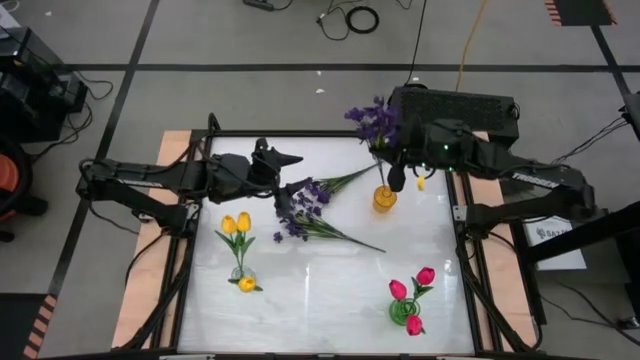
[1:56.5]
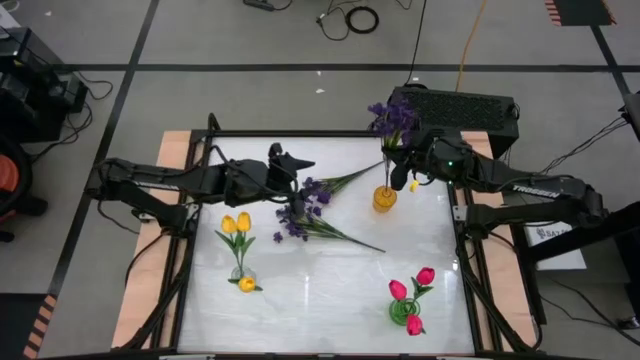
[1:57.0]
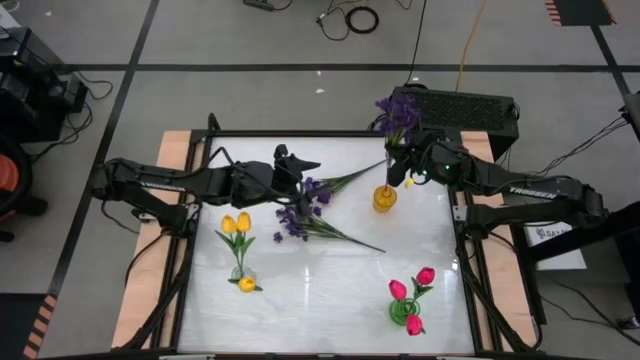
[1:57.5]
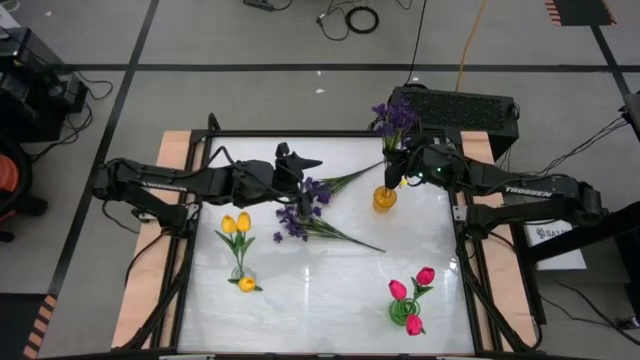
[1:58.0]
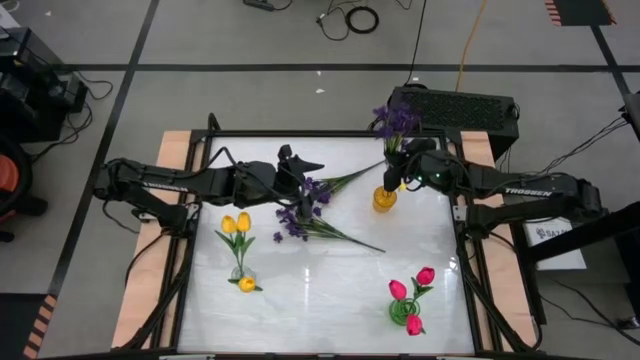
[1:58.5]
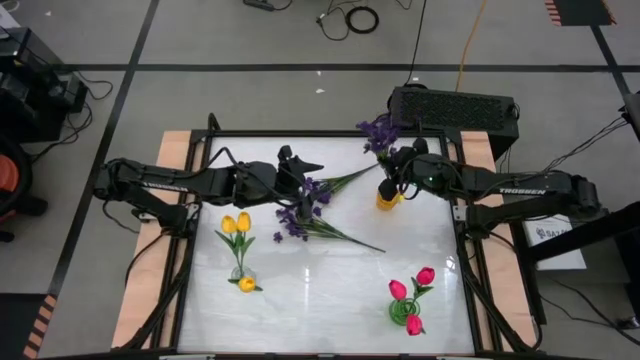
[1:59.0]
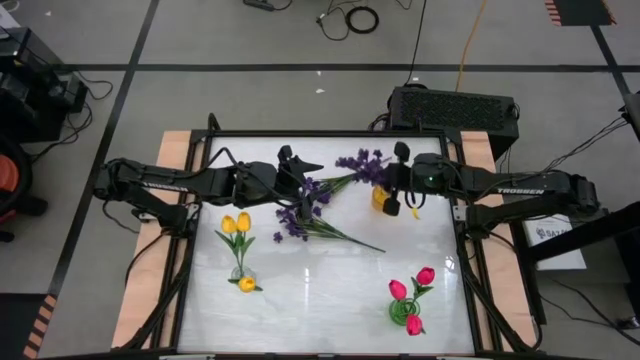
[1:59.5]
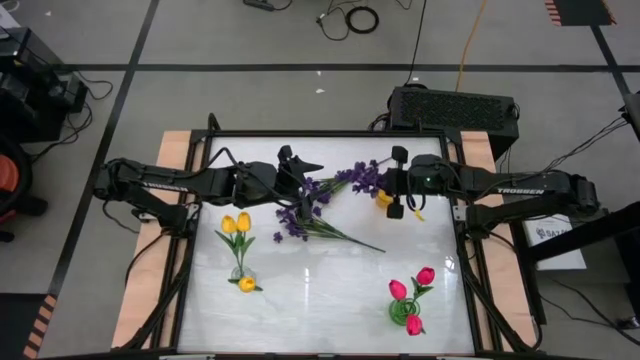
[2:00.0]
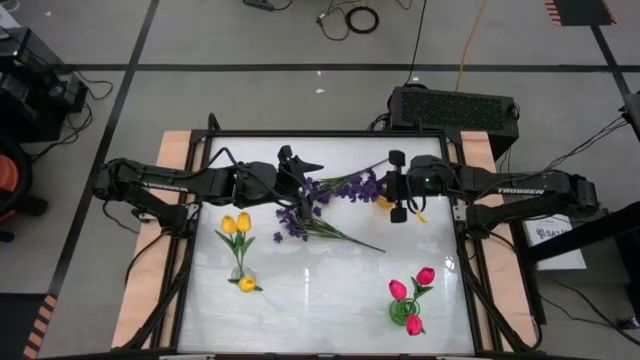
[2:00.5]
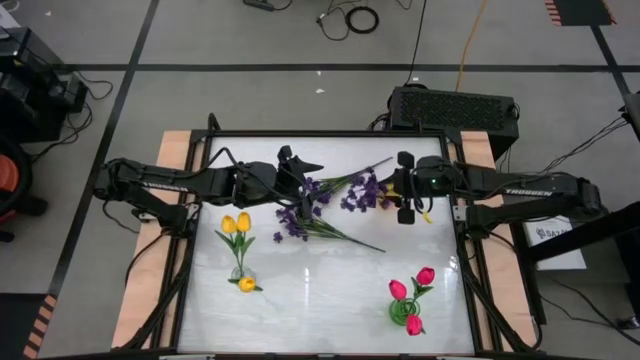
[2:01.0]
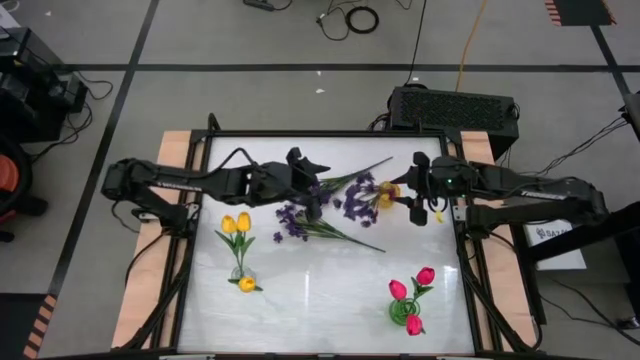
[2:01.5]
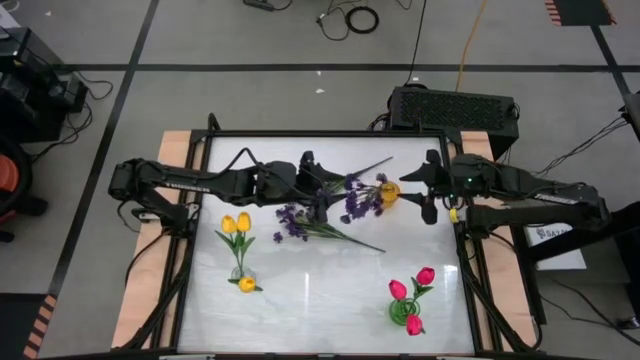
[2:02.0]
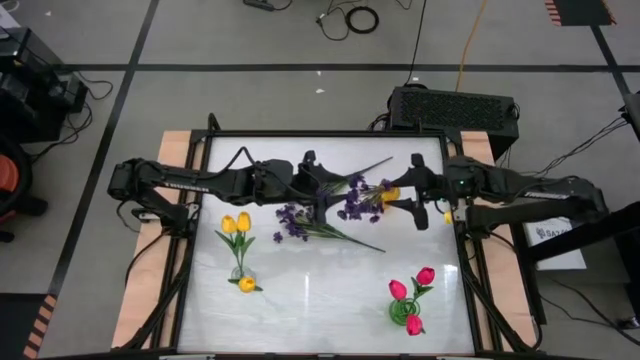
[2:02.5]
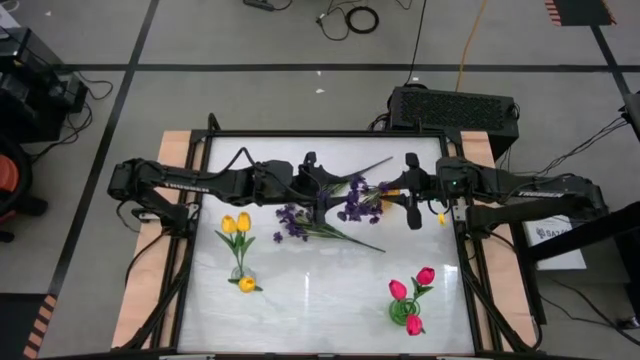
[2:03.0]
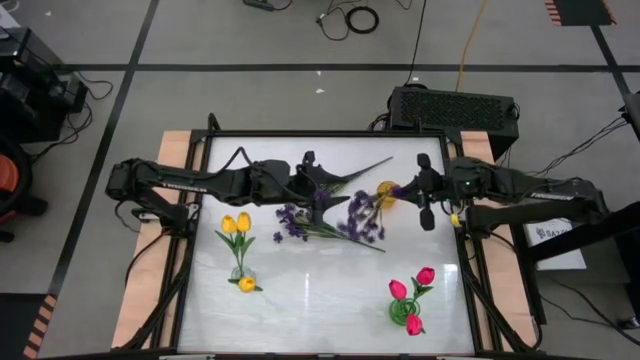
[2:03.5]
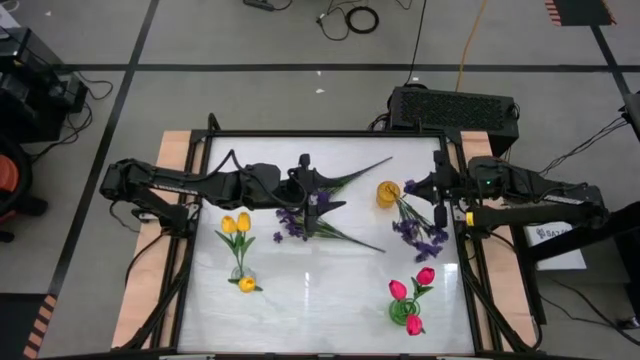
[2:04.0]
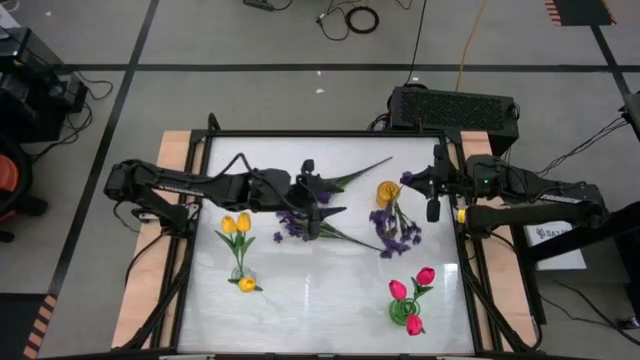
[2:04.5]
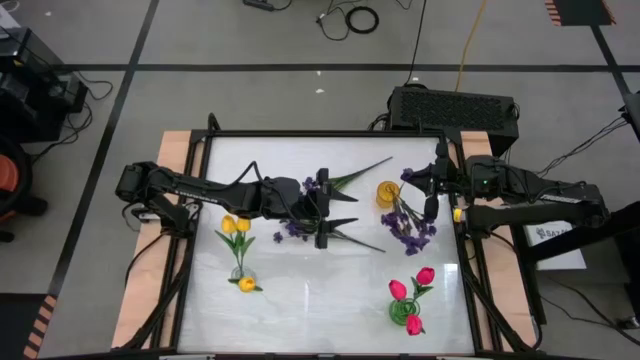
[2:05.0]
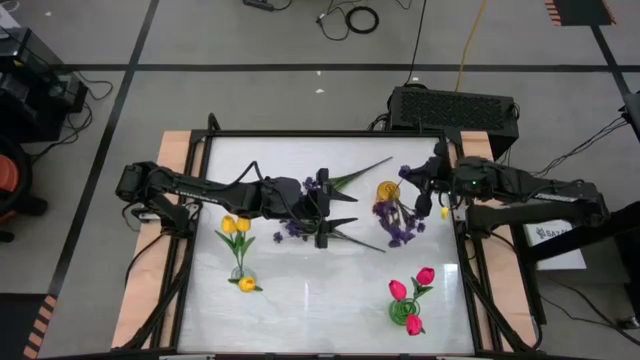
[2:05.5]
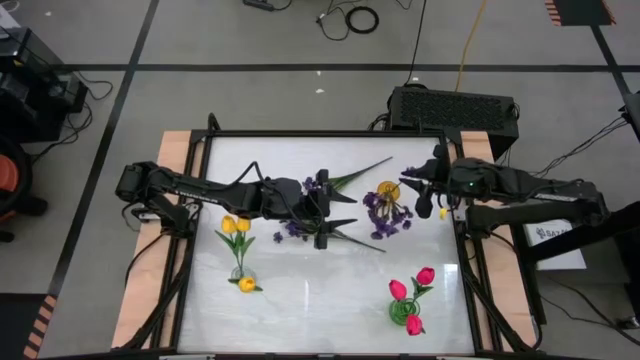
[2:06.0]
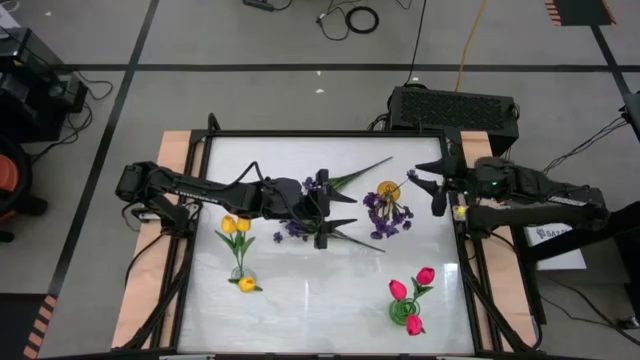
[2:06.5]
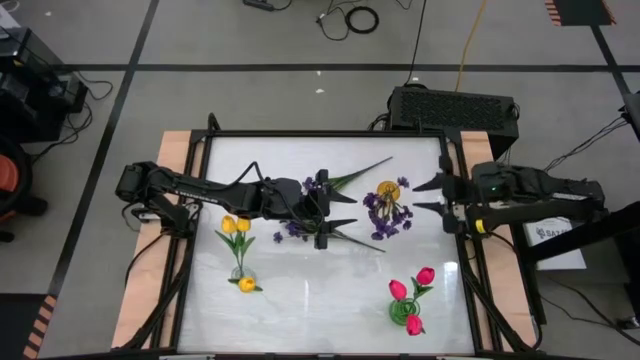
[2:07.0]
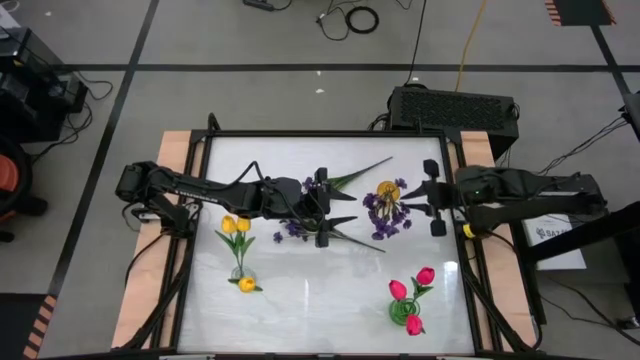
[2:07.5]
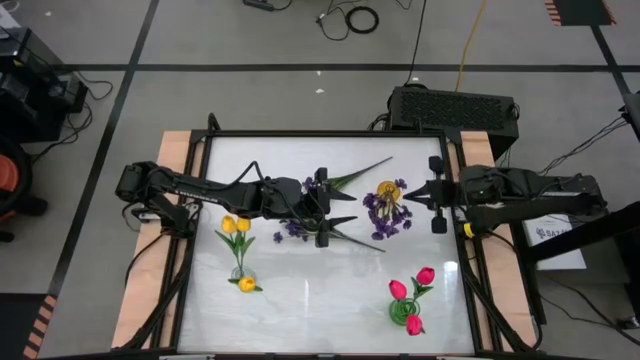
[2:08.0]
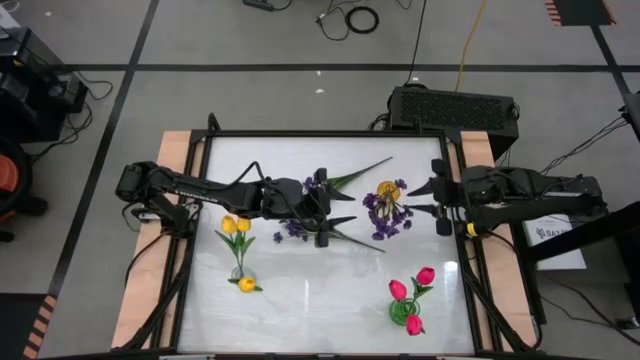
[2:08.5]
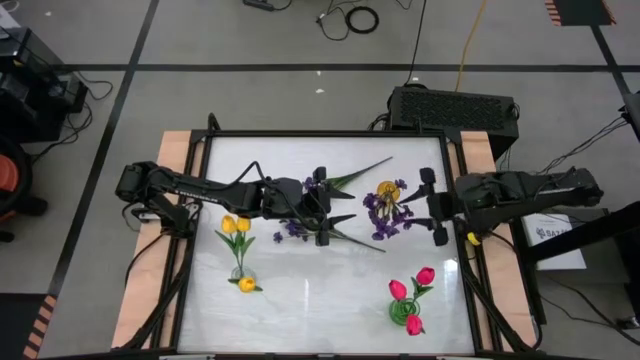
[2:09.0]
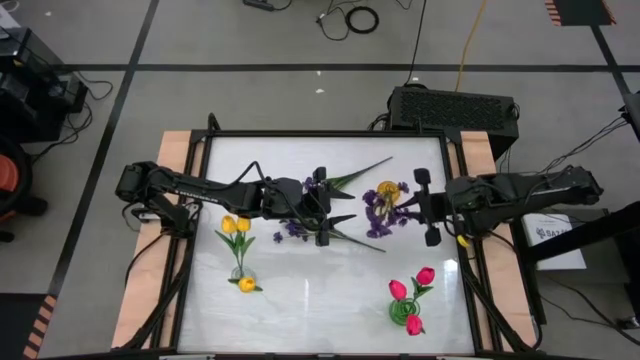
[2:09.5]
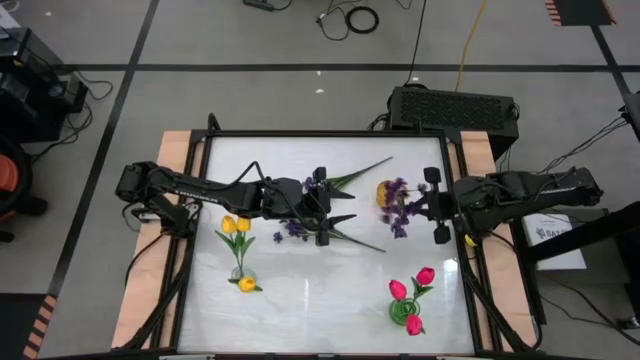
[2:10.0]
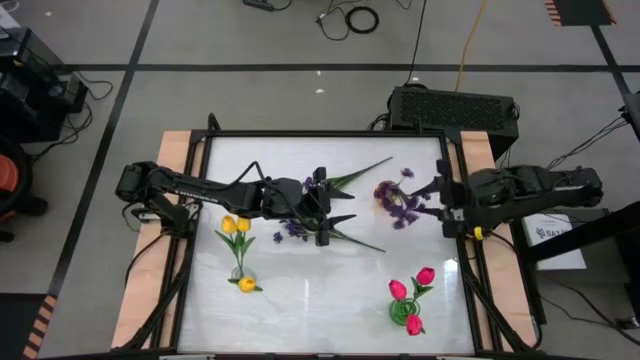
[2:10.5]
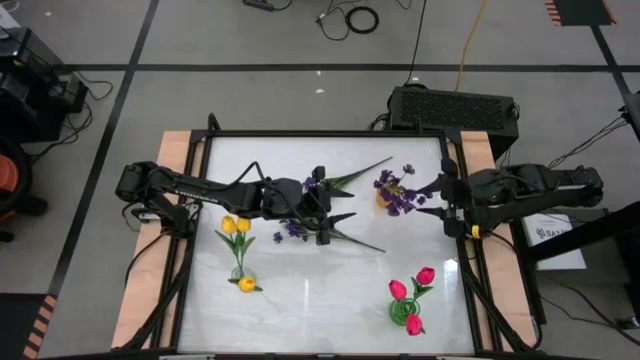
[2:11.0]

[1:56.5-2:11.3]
Task: Sort flowers into vase by color
Put the top left purple flowers into the yellow vase

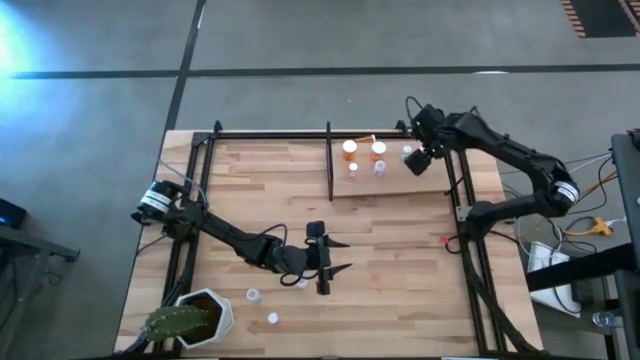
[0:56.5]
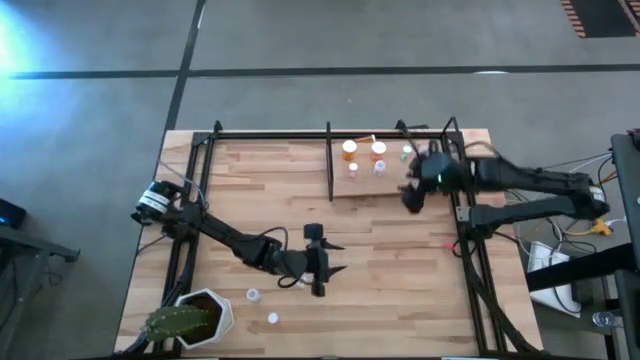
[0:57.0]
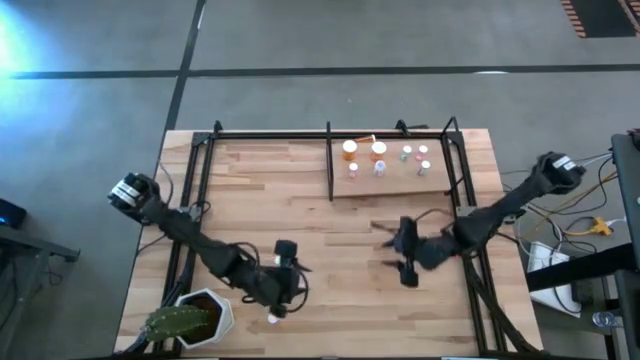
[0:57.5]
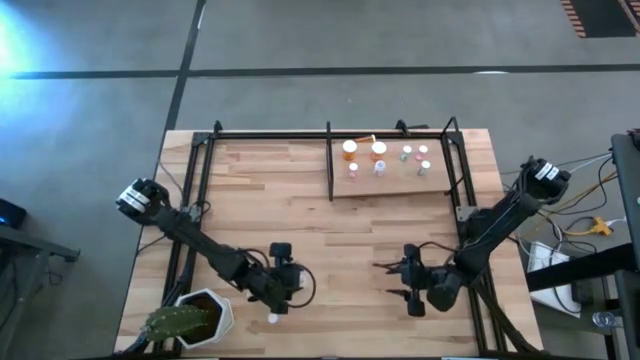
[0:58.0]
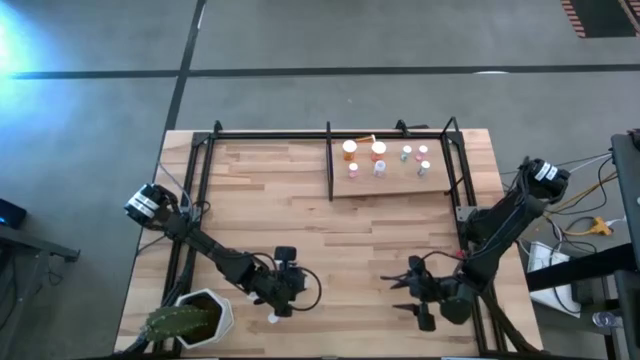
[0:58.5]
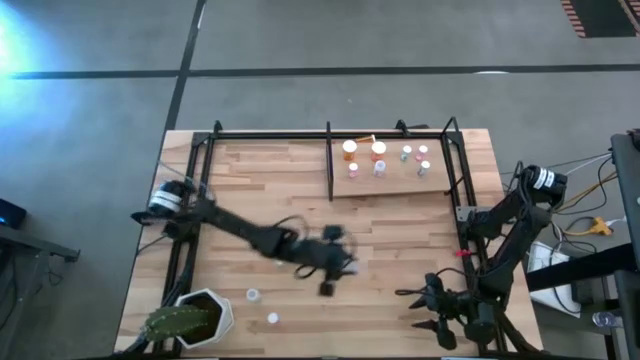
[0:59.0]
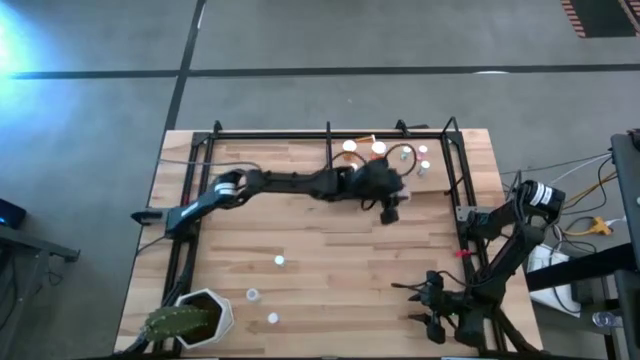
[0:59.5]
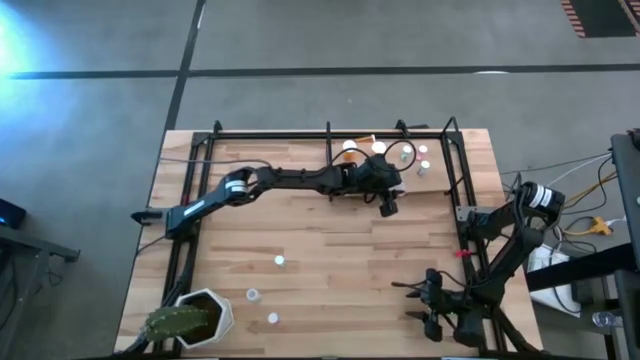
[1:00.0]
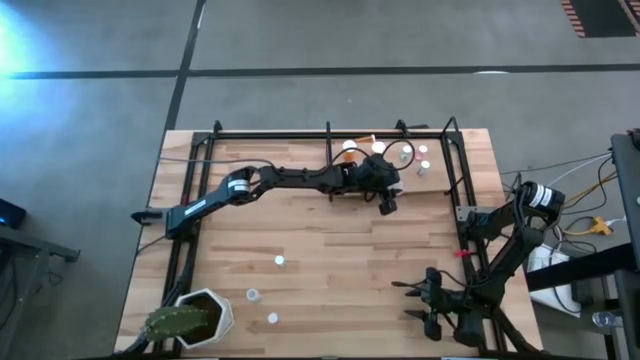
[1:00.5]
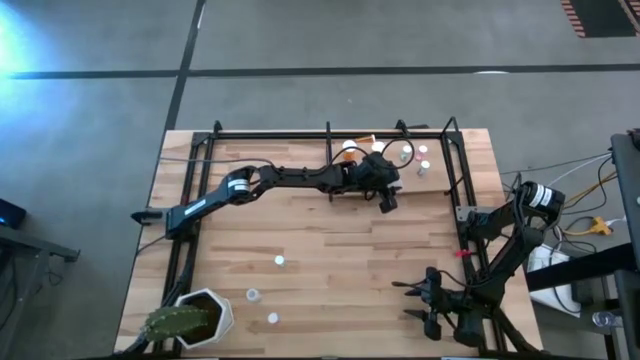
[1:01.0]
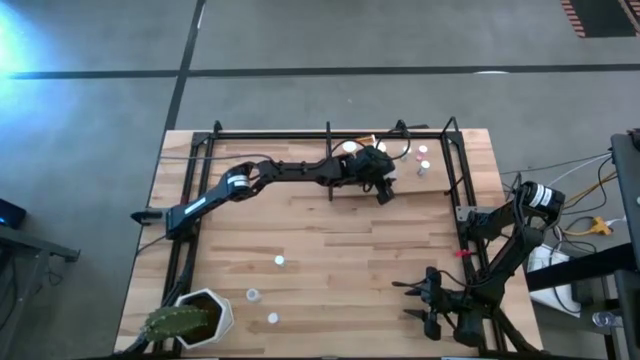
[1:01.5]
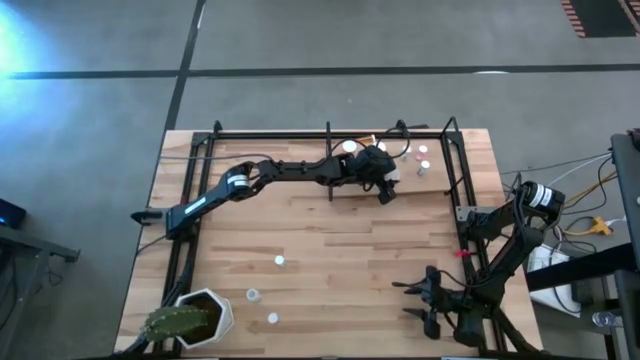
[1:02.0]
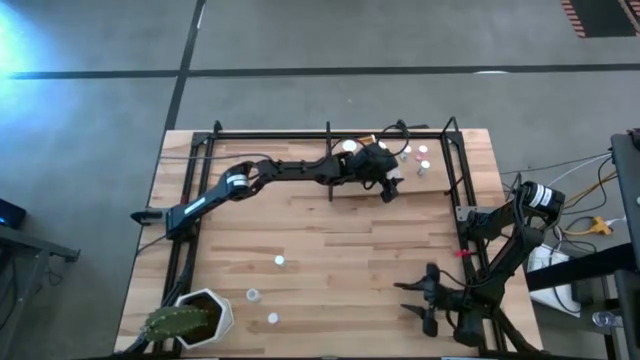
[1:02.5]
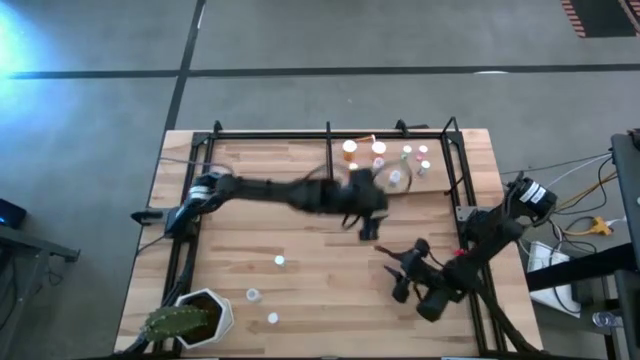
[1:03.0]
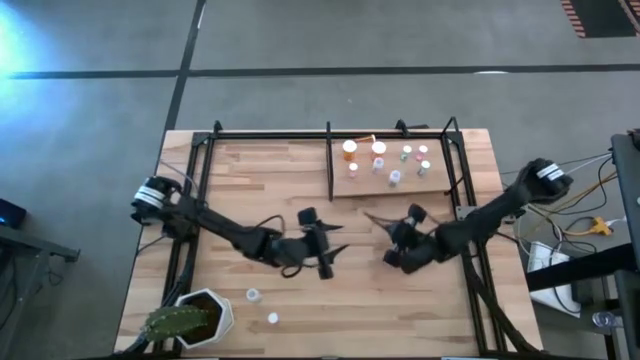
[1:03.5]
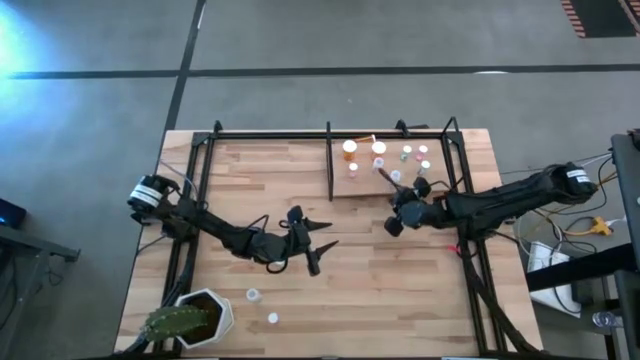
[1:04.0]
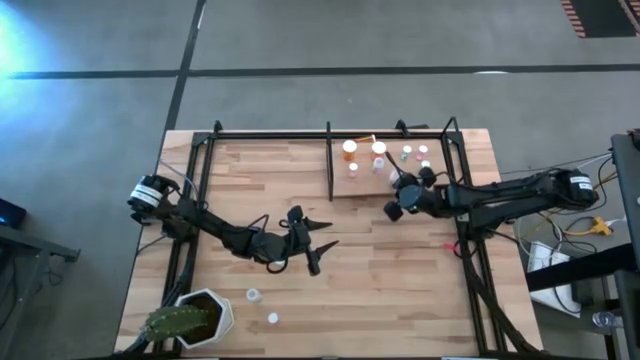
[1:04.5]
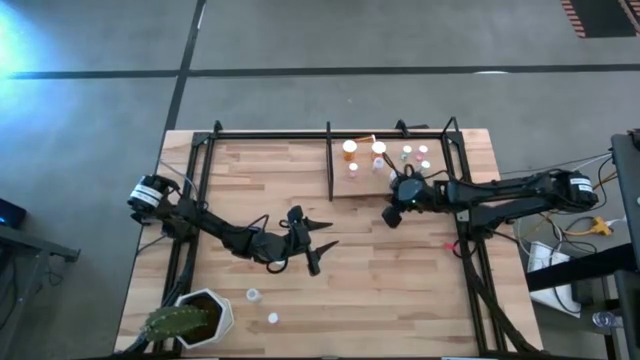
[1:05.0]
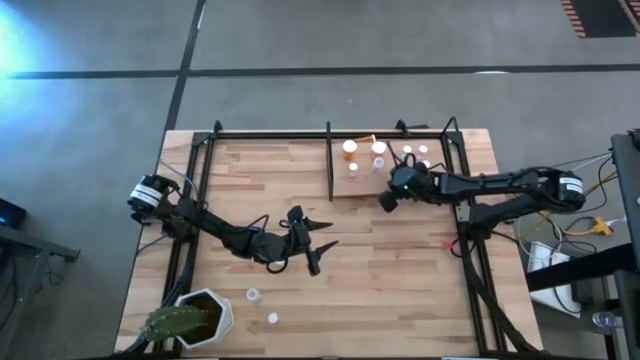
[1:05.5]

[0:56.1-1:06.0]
Task: Pick and place medicine bottles onto shelf by color
Put the right transparent pill bottle on the shelf
